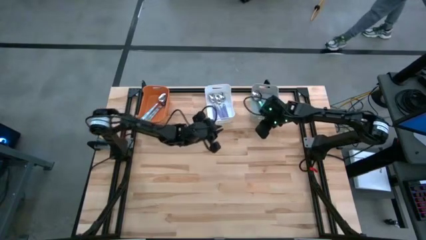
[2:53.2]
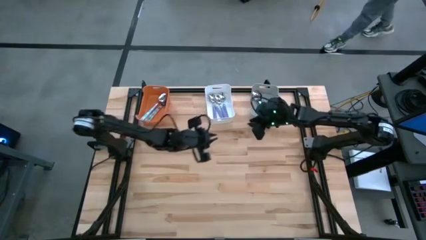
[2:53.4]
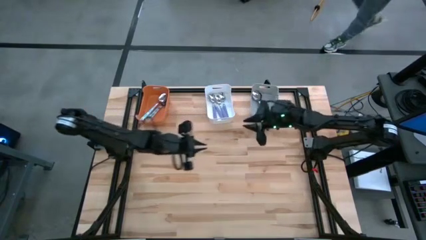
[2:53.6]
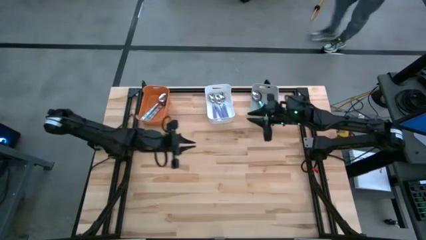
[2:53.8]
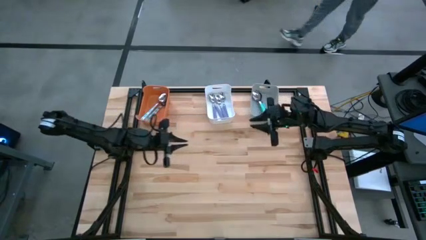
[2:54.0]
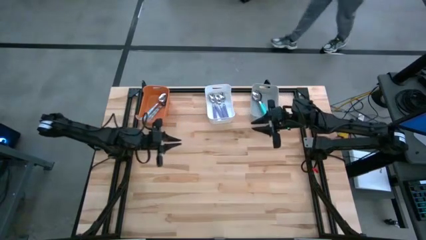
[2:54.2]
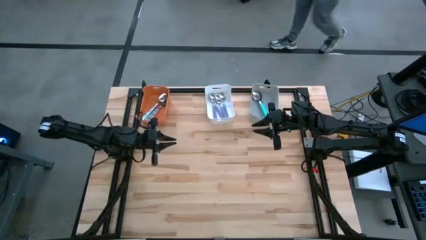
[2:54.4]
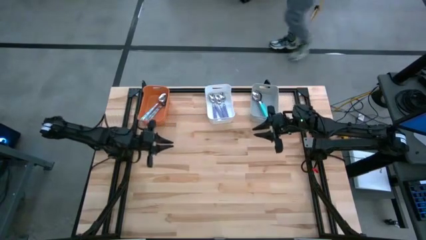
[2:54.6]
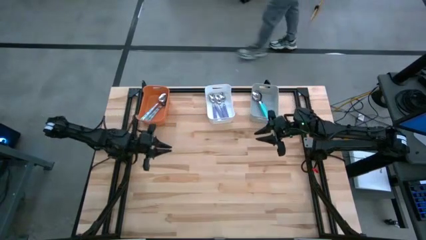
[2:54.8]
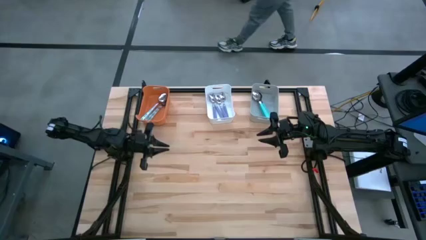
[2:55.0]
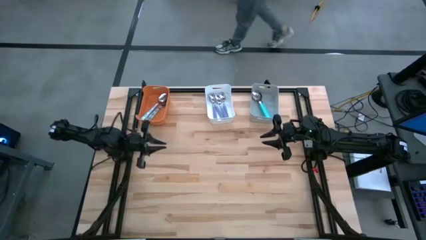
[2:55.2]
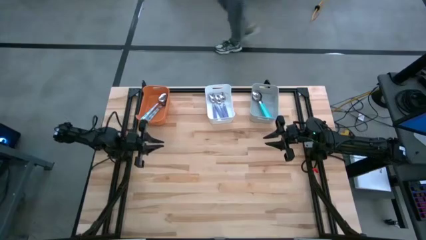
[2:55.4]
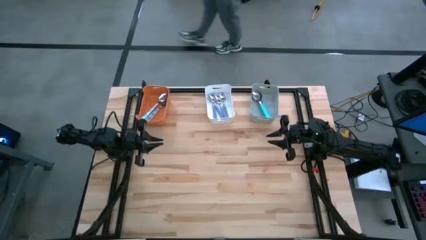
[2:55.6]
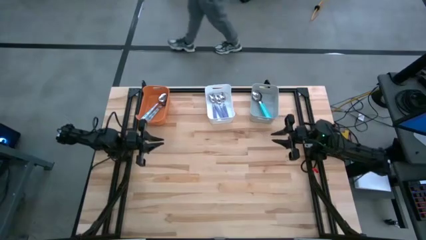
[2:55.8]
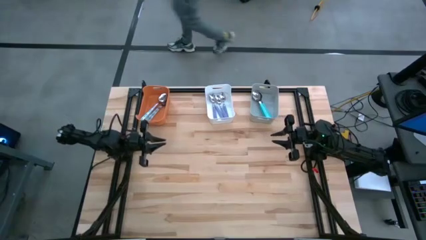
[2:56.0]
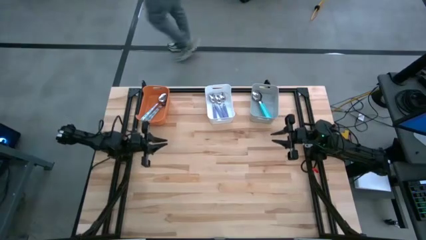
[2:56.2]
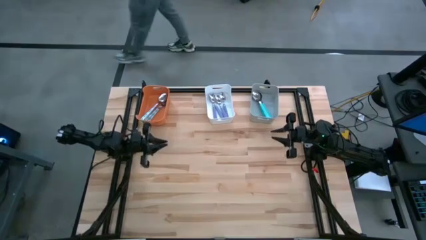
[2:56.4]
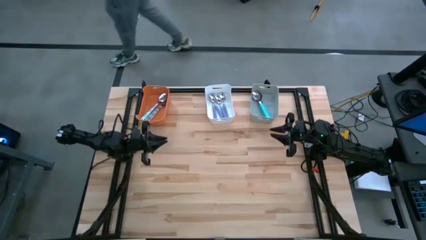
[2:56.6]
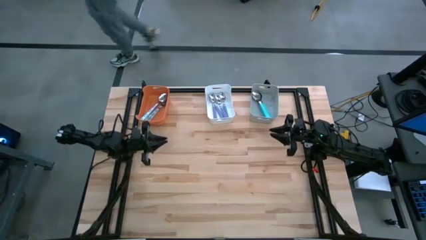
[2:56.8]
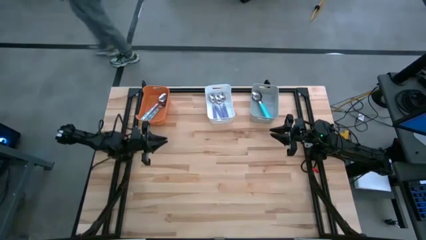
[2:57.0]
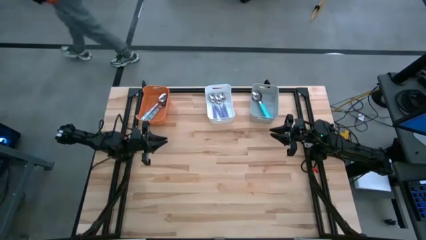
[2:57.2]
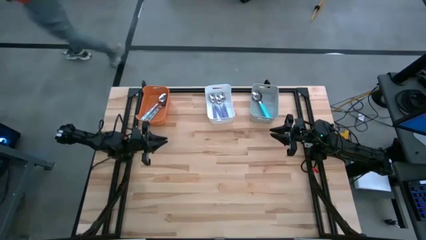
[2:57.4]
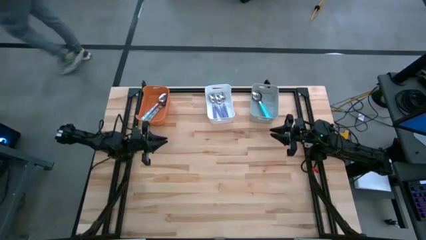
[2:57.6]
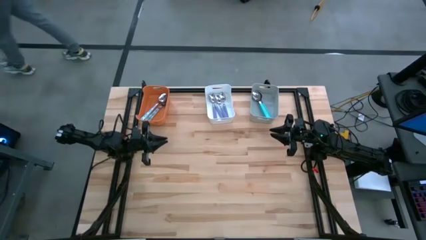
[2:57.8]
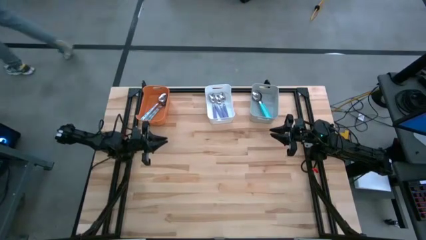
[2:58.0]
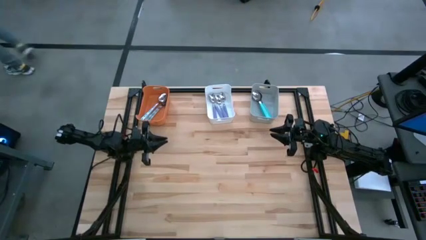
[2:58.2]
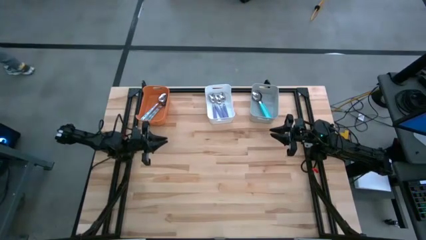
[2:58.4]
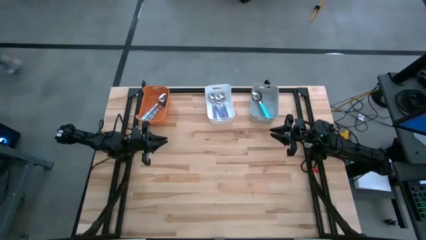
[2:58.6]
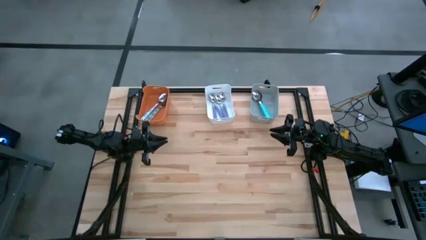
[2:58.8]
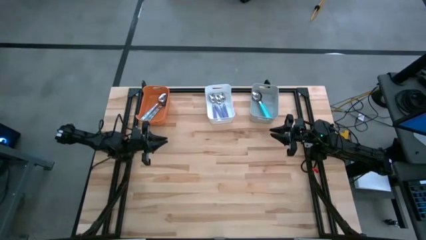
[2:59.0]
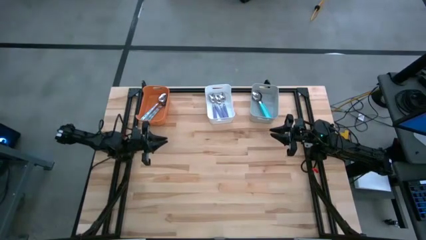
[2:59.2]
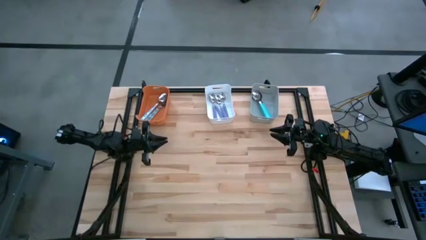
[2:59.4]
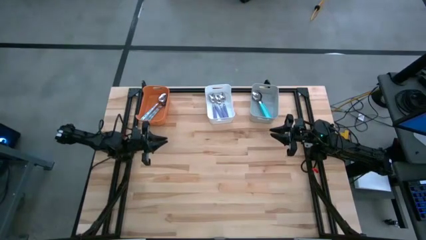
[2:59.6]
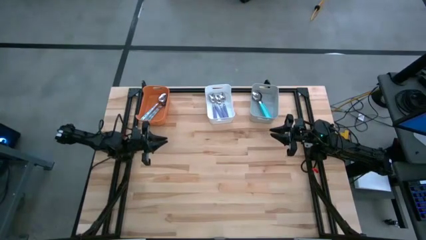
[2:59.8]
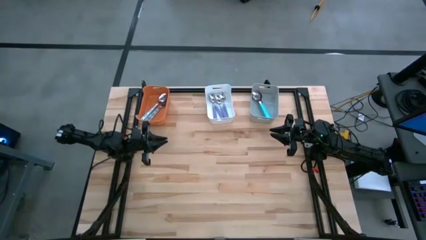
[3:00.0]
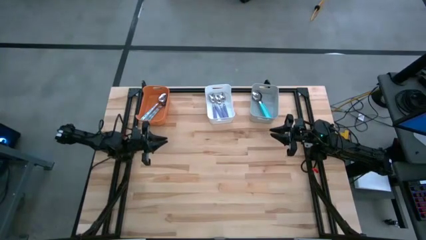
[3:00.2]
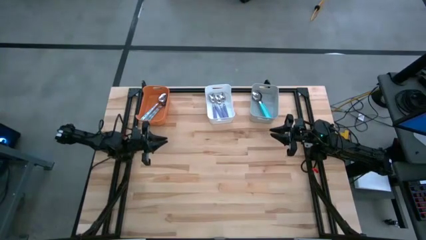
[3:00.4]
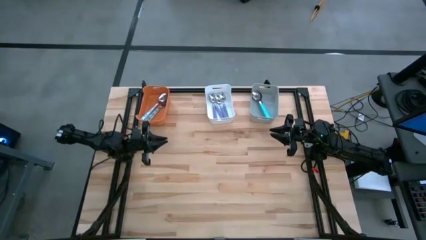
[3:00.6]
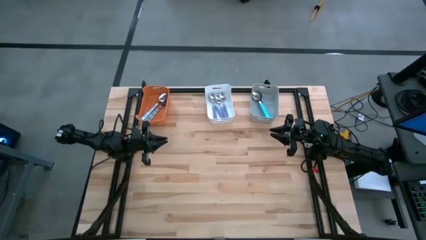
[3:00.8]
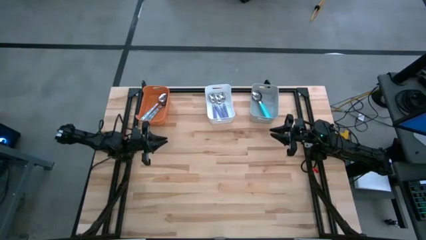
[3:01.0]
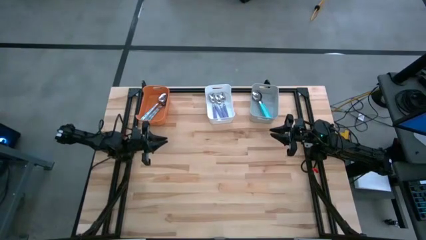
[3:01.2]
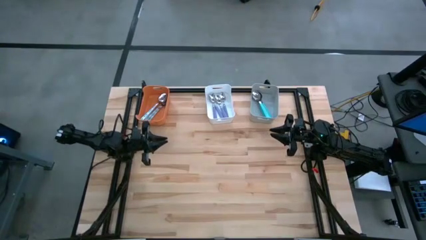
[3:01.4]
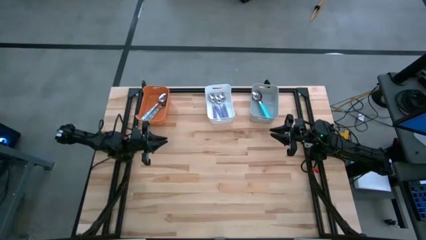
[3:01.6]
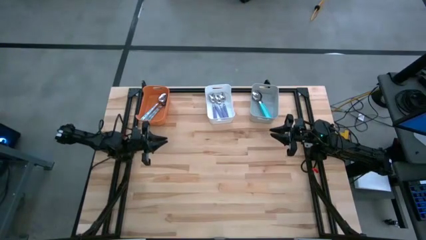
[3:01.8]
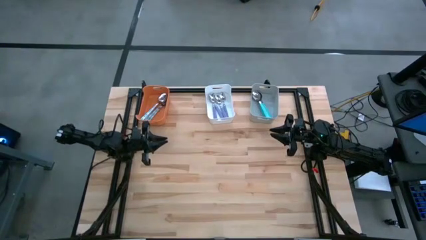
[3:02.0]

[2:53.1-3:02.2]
Task: Sort silverware by color (type)
Return to Home Position

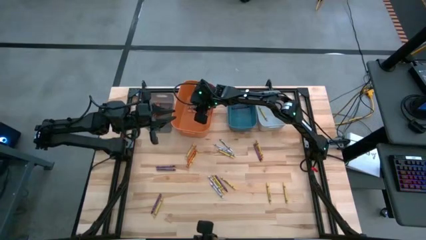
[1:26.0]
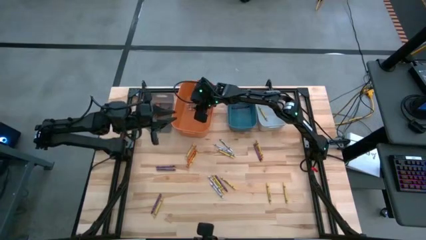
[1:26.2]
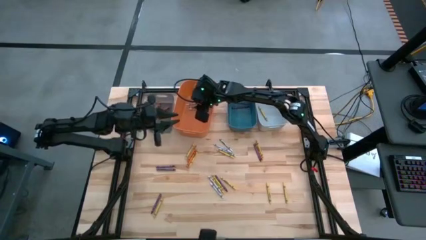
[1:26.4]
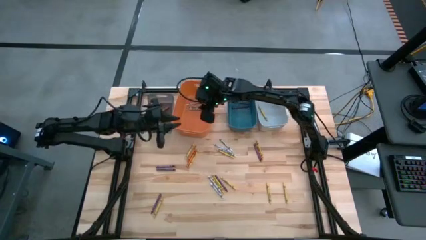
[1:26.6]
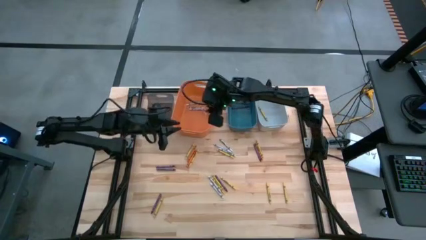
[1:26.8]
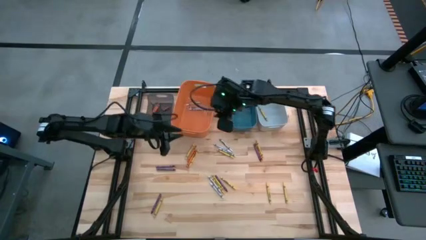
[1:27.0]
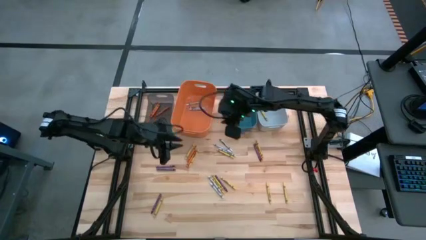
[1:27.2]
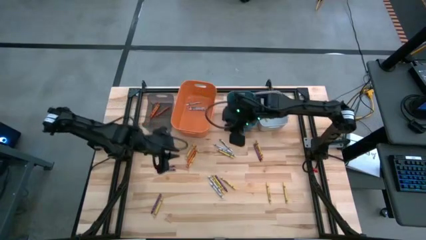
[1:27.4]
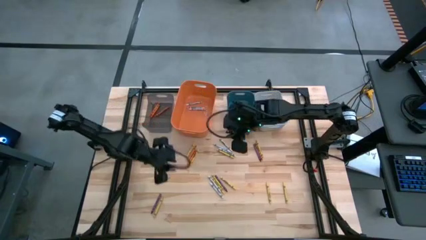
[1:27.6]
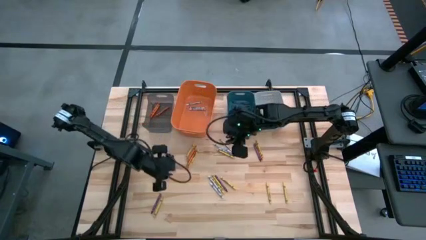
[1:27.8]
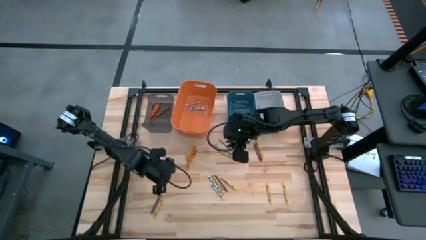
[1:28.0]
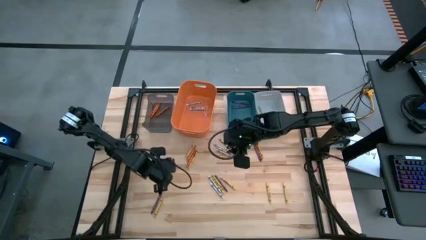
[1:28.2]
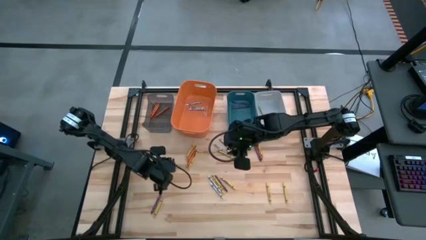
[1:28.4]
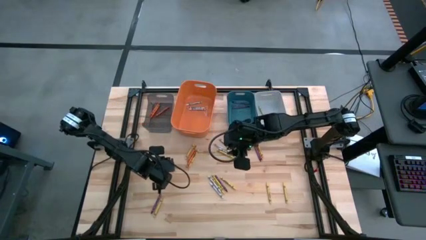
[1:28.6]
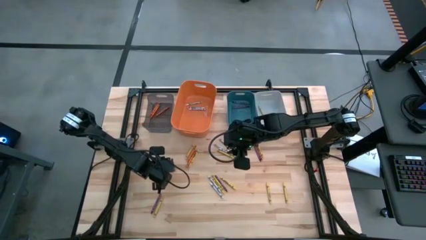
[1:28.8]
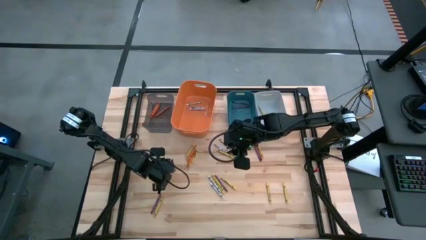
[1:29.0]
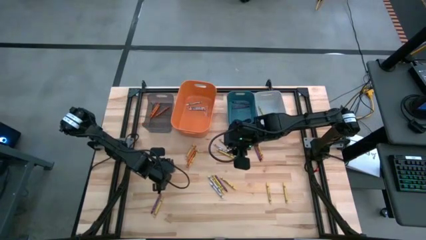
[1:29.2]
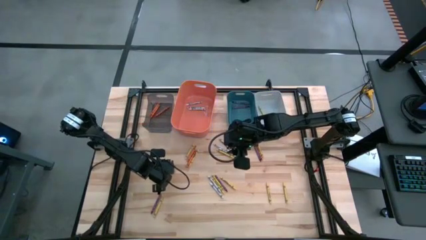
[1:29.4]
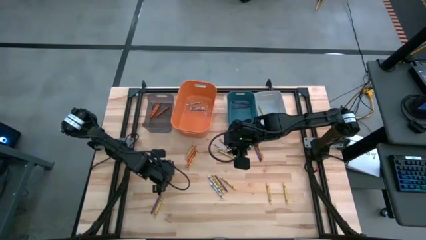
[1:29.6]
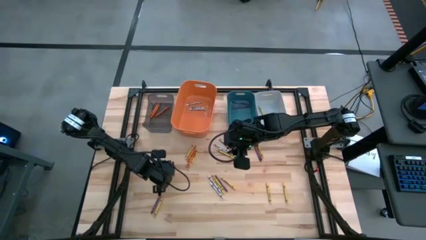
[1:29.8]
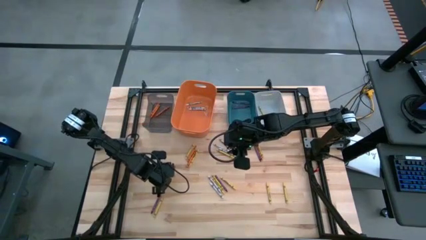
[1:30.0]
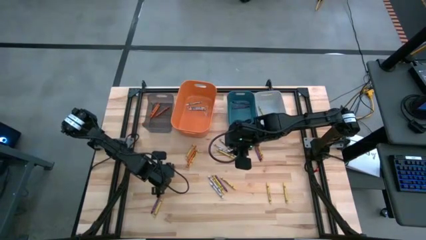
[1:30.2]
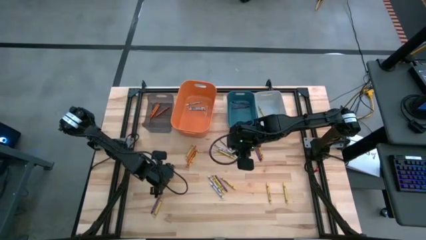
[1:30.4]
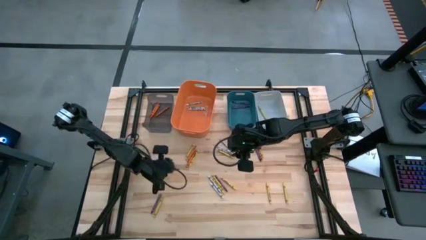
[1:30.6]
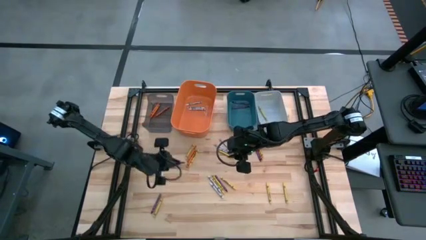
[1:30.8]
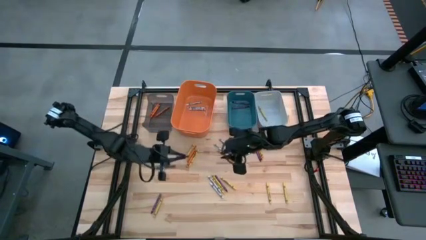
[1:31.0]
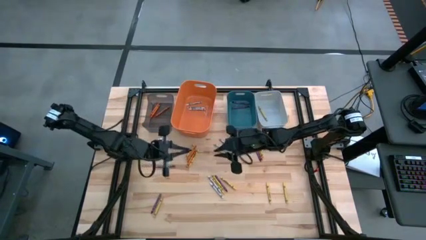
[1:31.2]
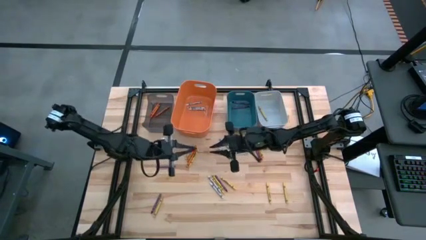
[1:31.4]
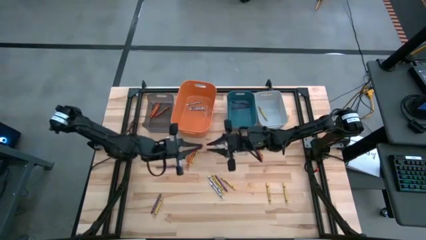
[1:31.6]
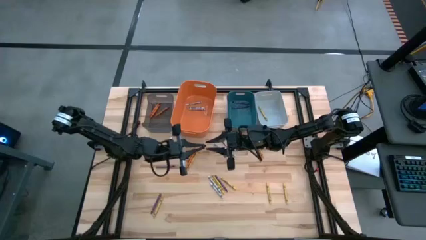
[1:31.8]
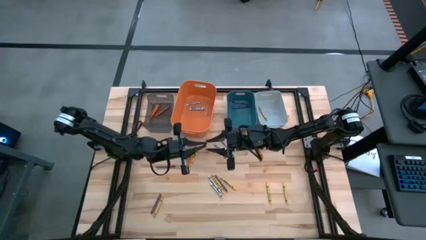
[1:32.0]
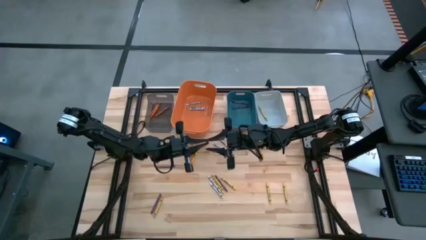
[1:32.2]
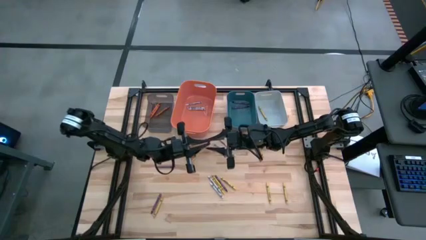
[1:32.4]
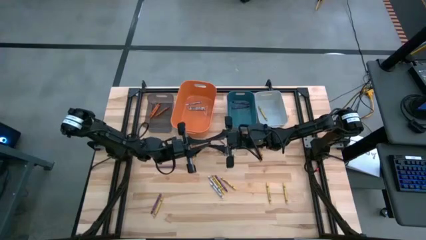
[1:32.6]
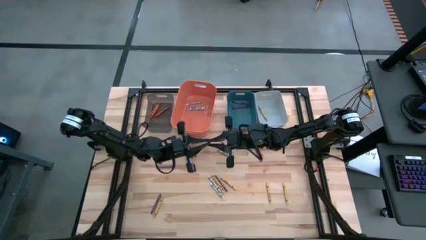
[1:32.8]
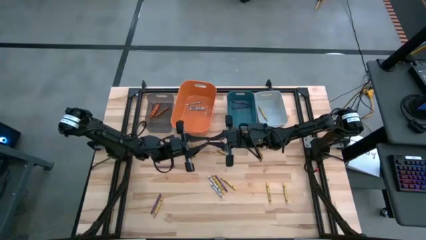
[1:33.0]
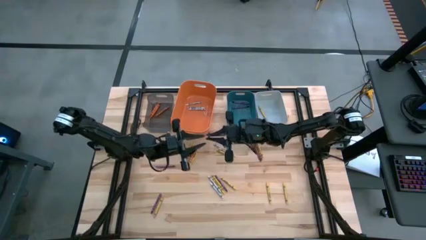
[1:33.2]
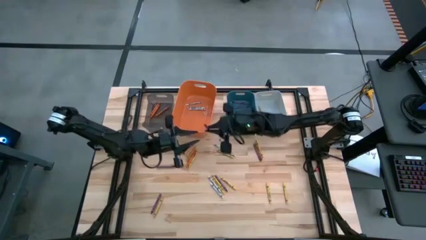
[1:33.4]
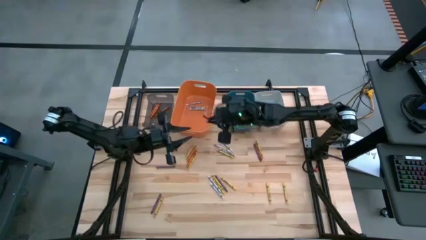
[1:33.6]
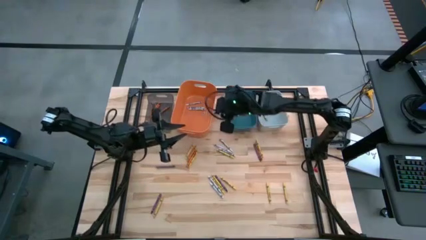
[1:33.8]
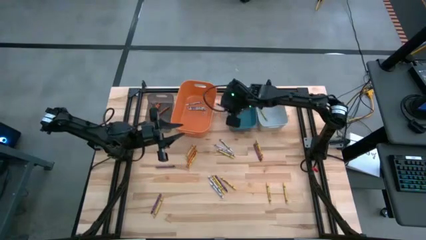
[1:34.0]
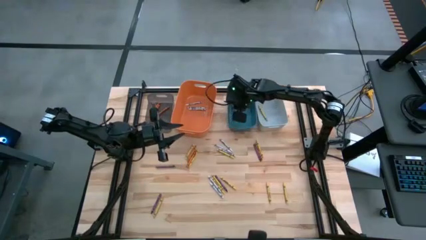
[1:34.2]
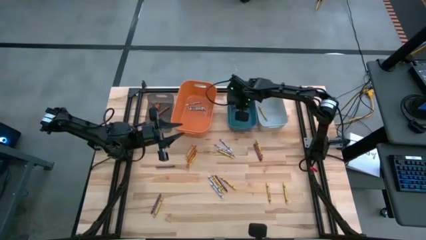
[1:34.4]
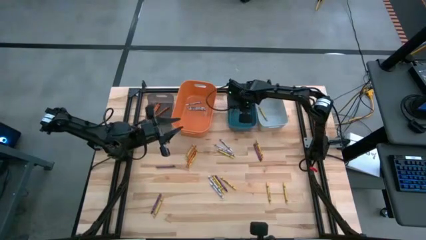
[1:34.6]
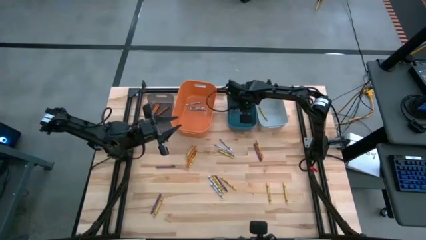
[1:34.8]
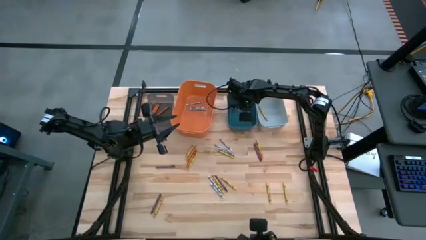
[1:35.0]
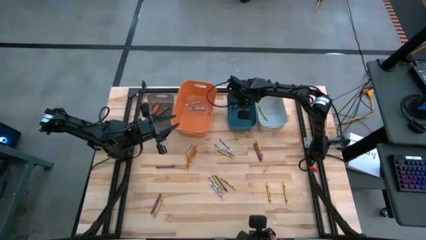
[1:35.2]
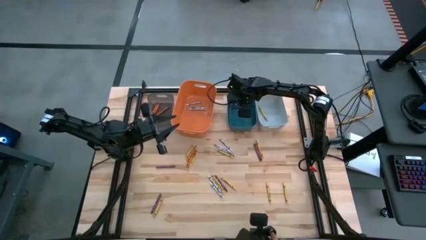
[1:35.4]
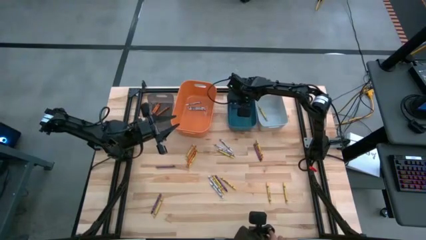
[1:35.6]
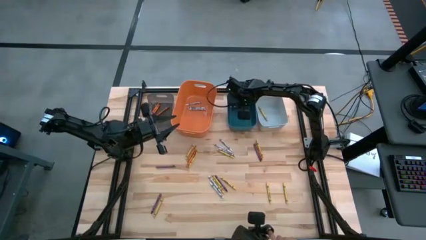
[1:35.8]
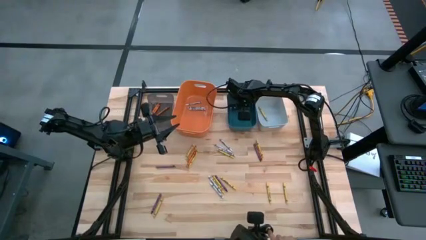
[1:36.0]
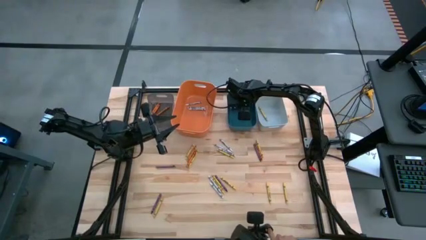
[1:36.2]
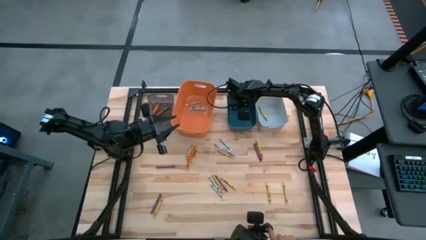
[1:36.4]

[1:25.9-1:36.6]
Task: Sort crayons
Put the purple crayon into the blue bin
